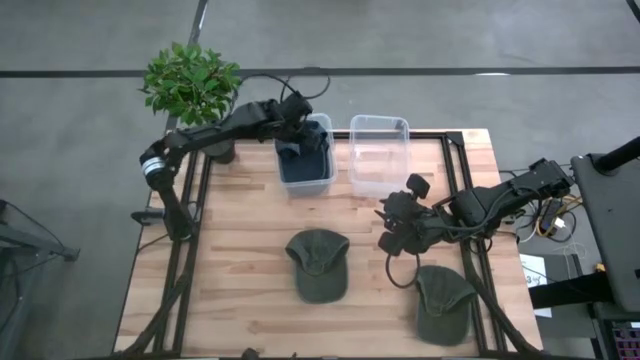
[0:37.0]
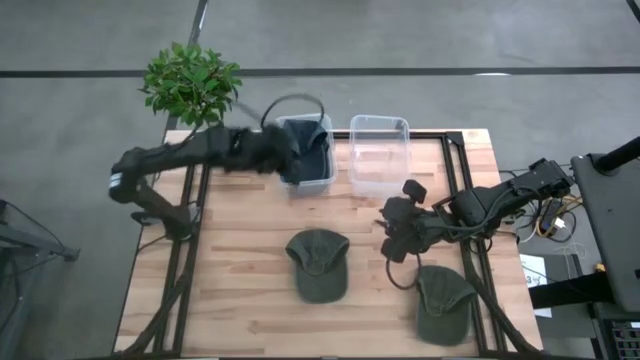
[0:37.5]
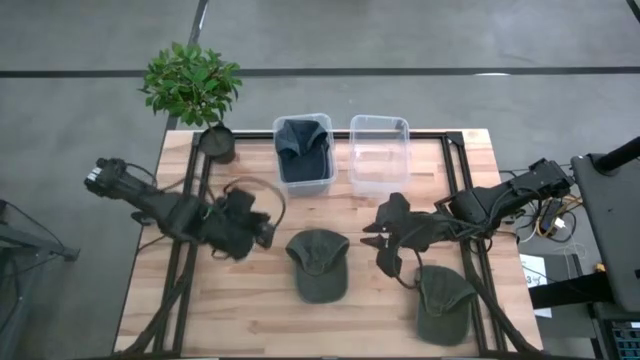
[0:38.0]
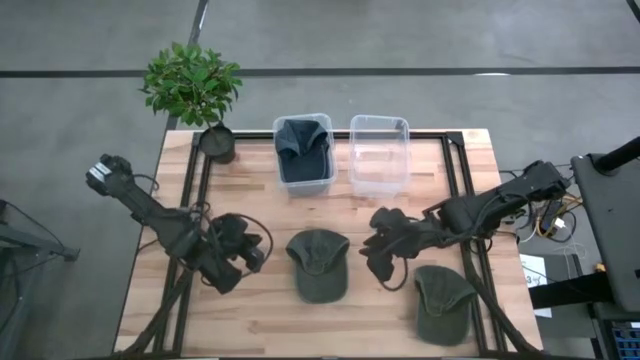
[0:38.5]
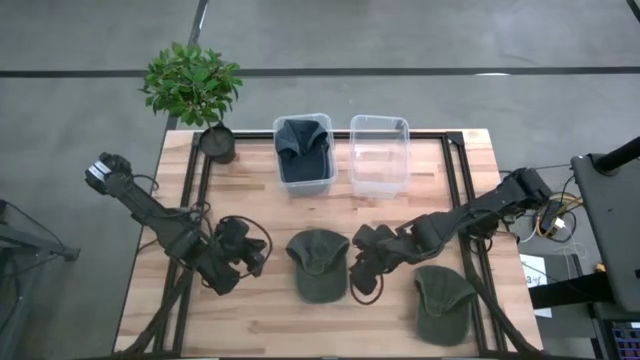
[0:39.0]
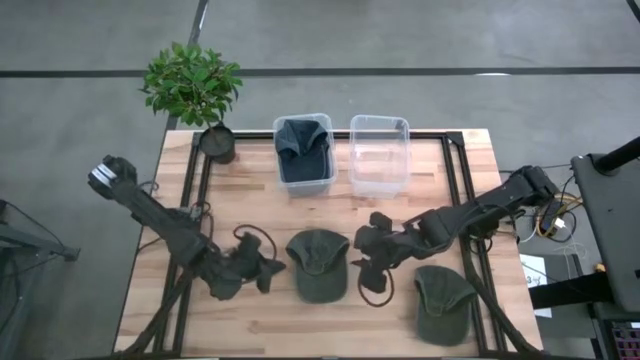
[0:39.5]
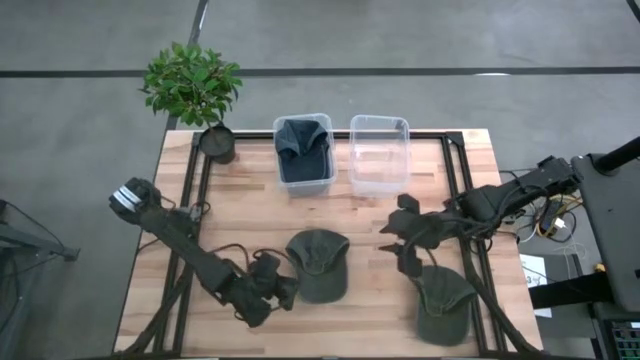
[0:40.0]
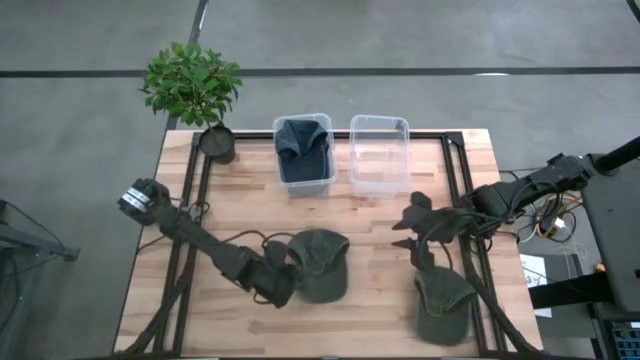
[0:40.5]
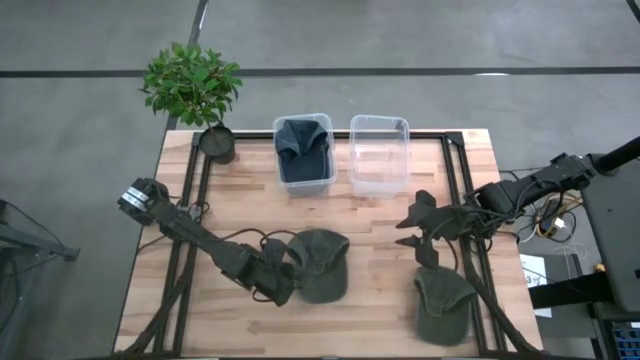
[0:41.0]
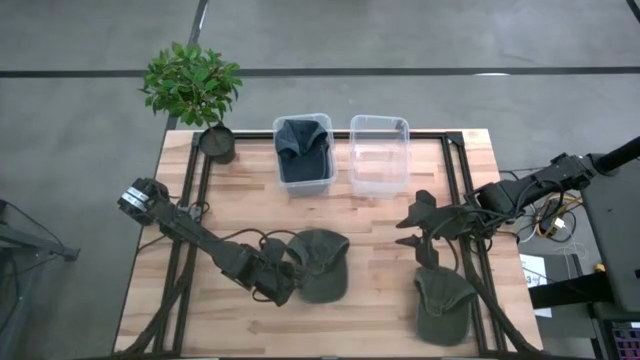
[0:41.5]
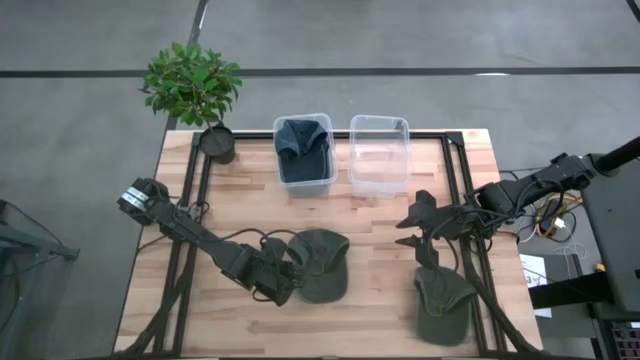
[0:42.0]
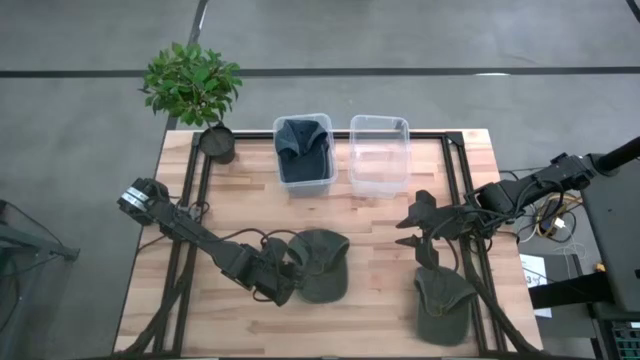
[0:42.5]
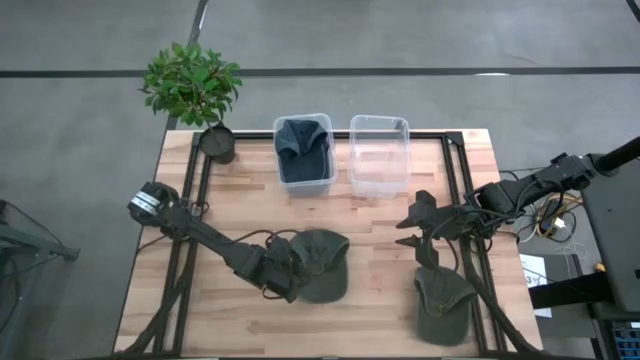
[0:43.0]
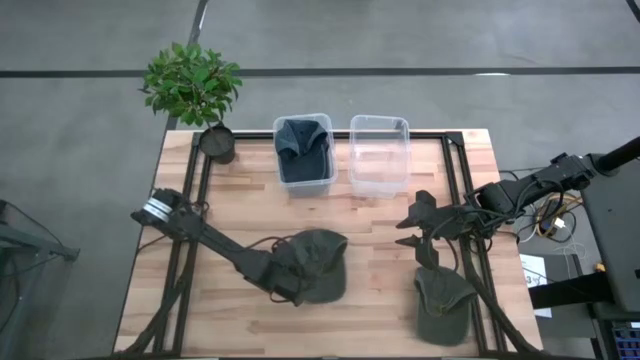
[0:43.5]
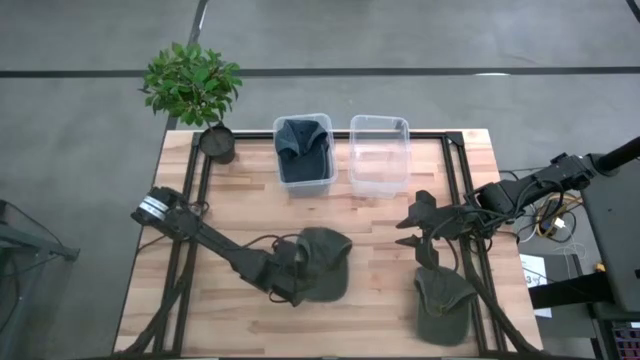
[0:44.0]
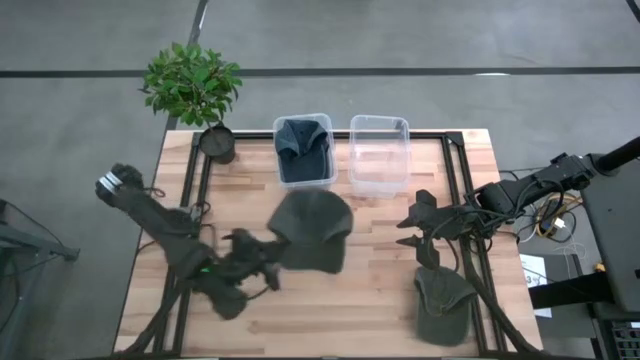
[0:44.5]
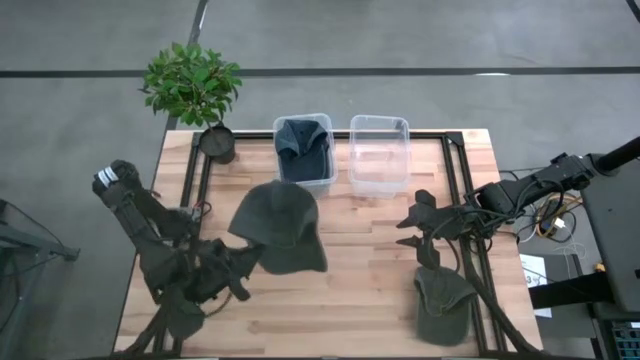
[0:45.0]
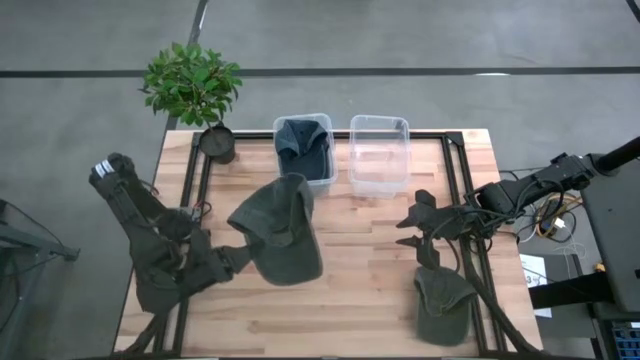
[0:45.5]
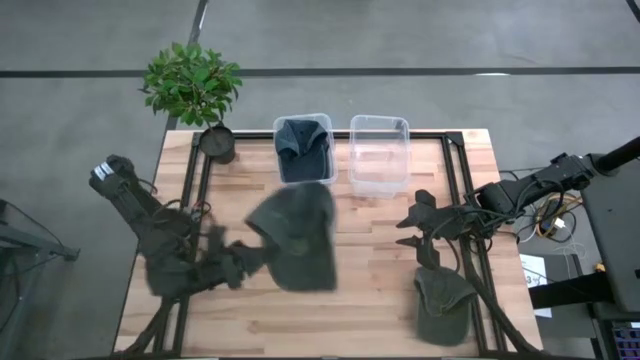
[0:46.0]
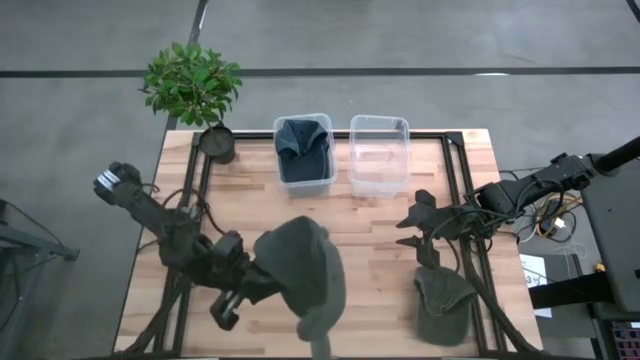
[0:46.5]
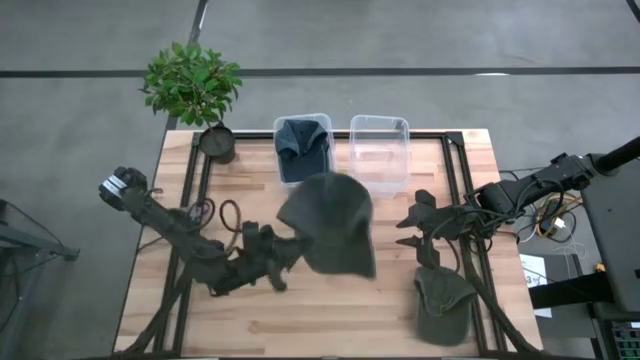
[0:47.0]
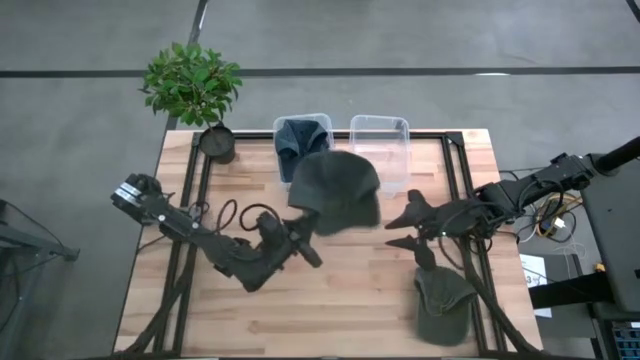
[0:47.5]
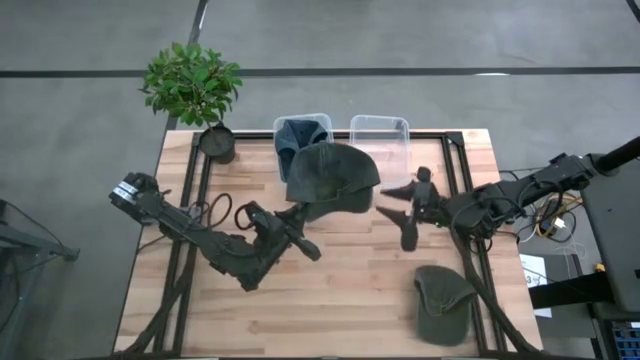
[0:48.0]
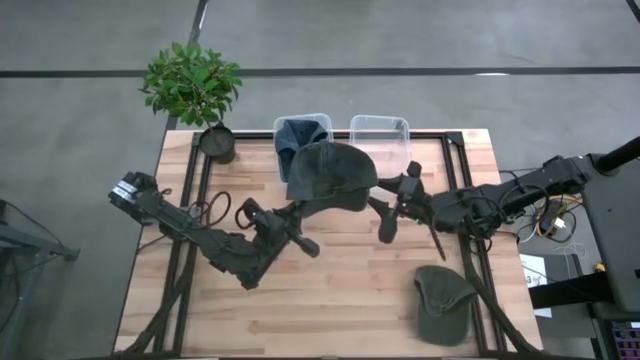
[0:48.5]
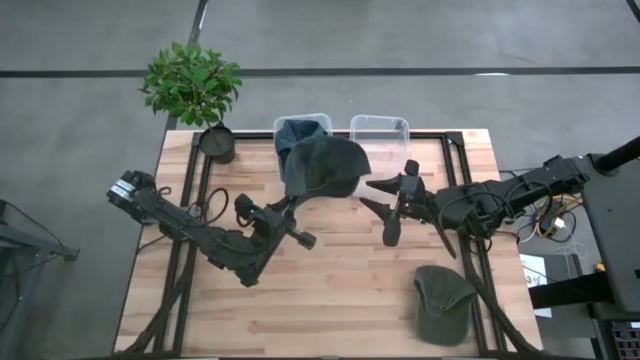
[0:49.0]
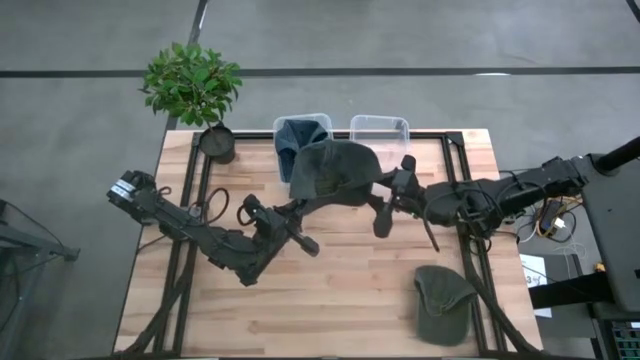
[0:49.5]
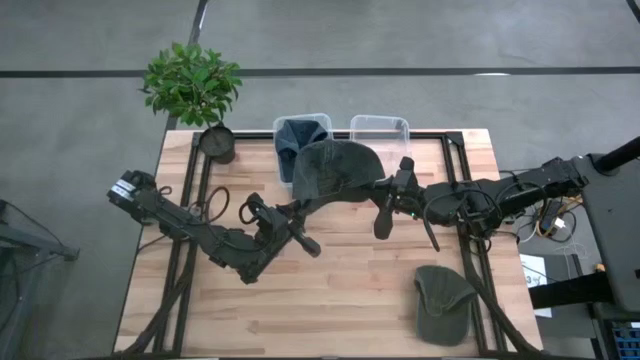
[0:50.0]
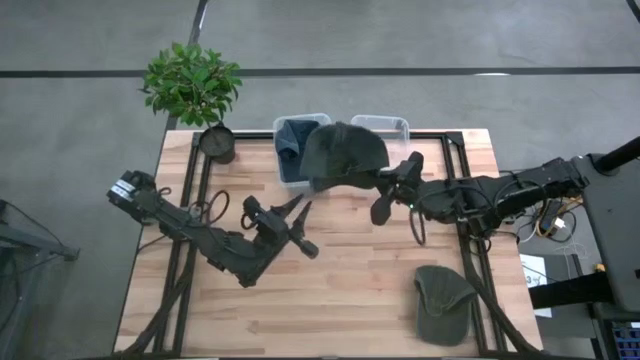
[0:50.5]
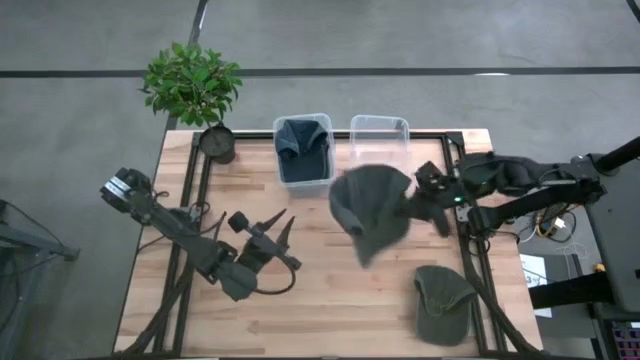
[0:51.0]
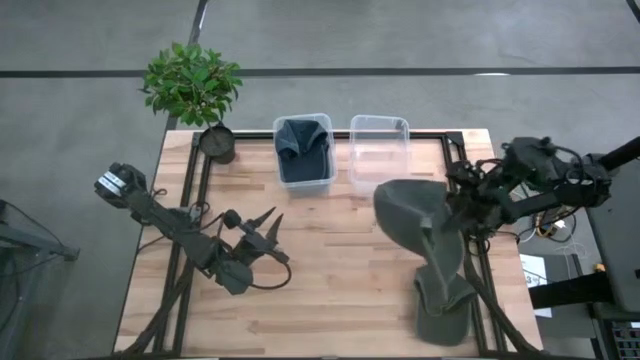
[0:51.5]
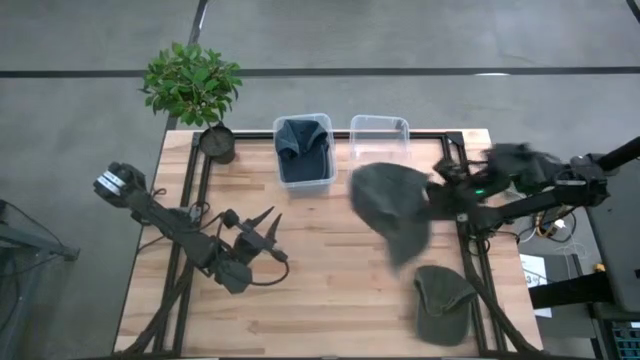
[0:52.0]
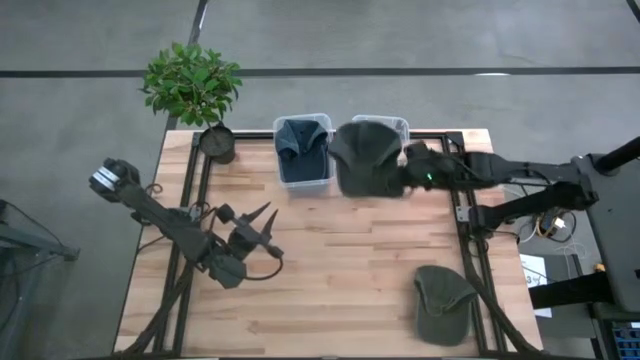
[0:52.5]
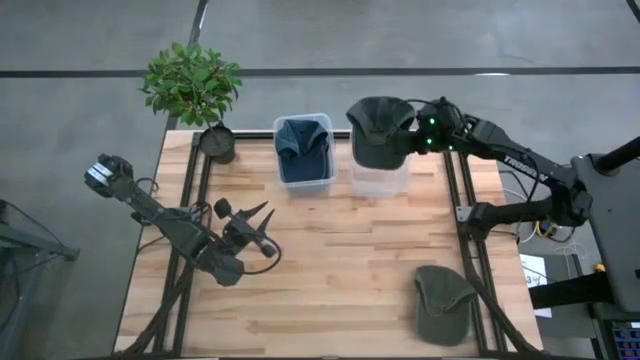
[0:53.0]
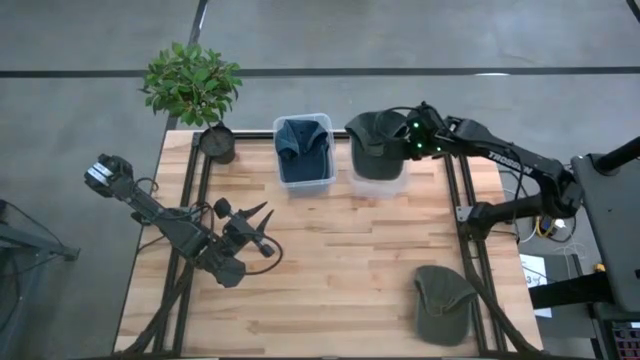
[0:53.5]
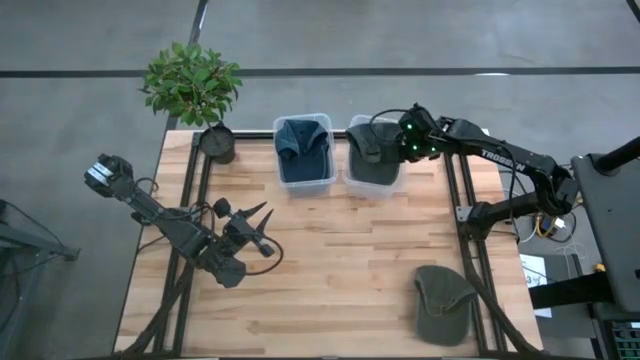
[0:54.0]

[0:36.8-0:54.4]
Task: Pick & Place hat
Put the left black cap into the right transparent bin

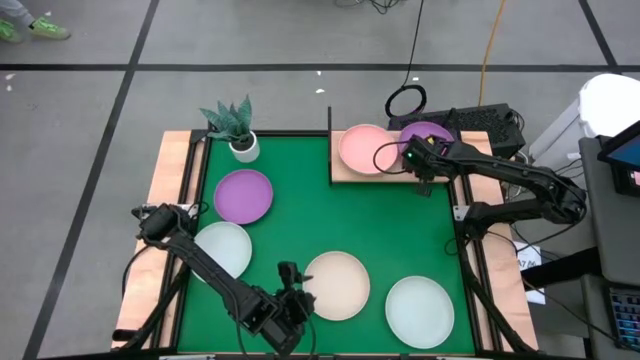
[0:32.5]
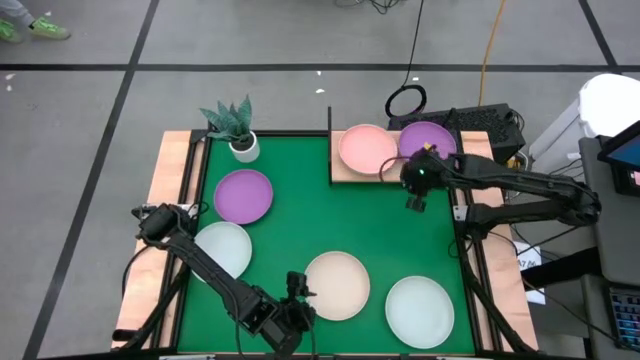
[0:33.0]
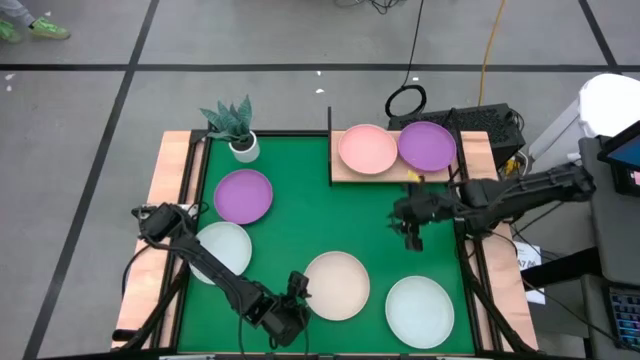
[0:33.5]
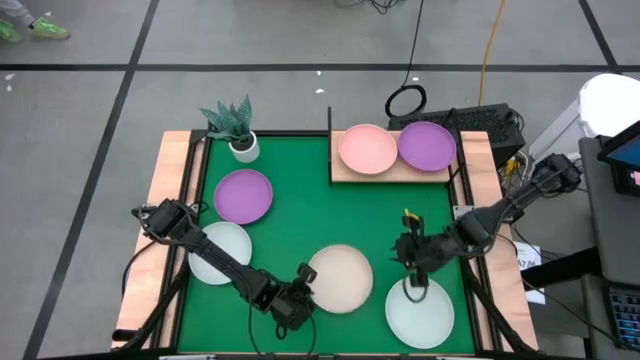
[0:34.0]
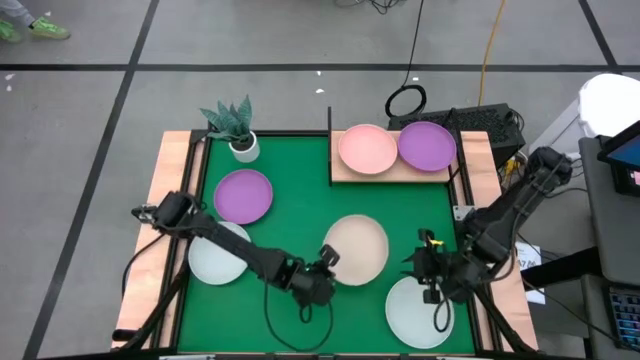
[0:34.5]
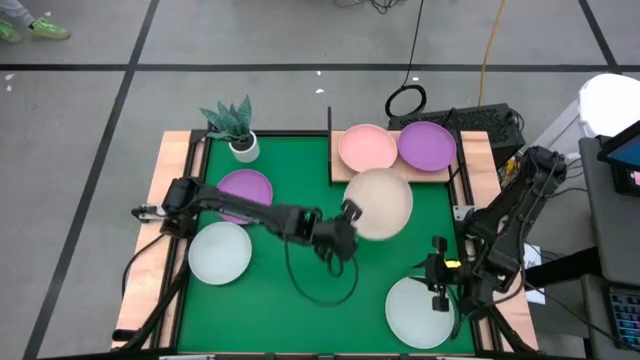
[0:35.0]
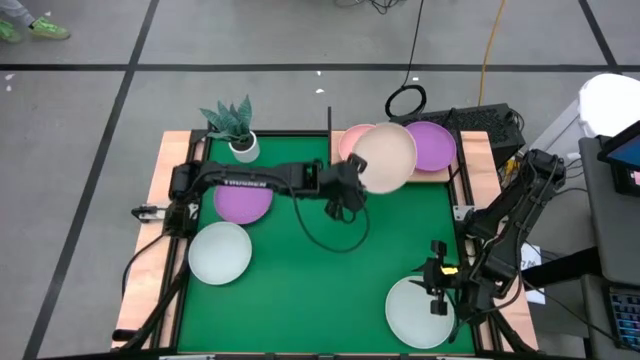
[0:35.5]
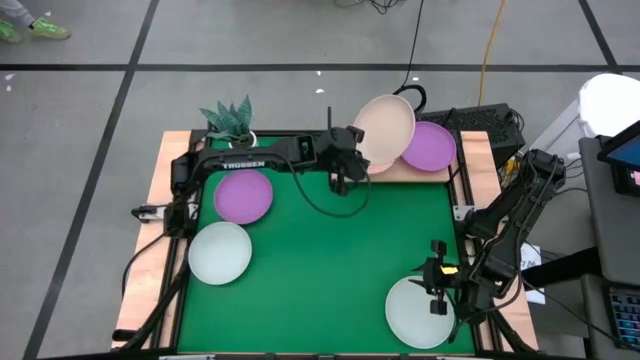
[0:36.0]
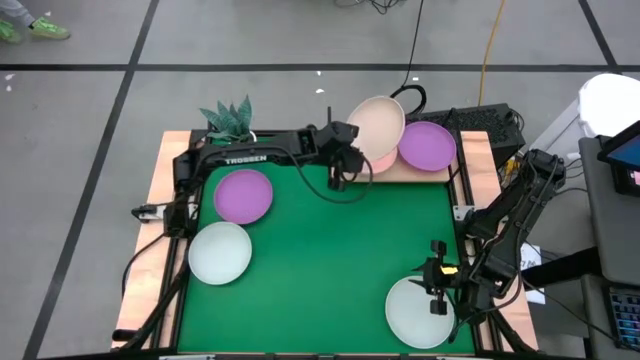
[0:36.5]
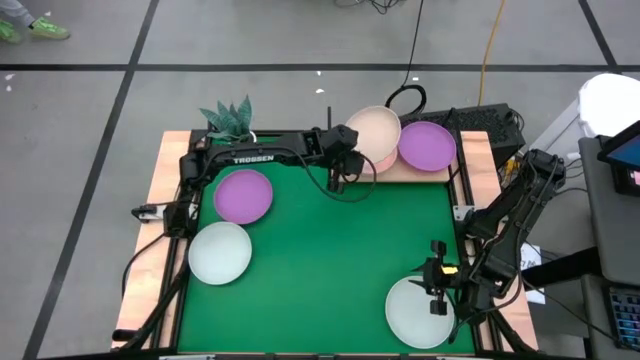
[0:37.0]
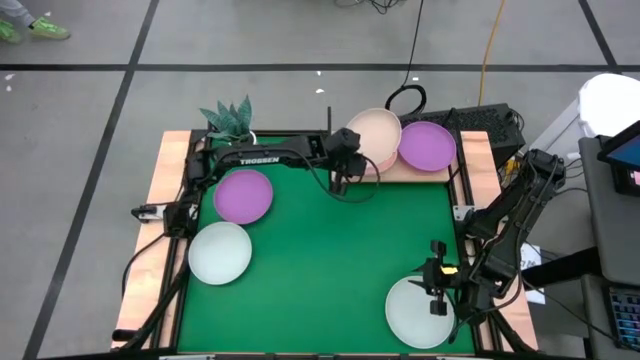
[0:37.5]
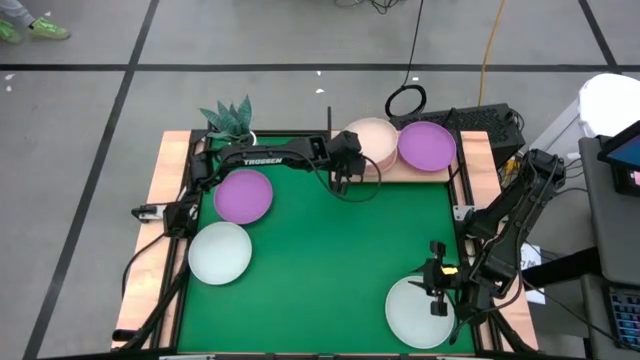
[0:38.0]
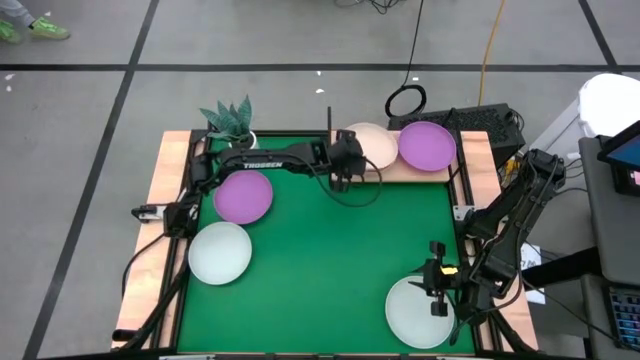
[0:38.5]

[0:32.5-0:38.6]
Task: Place and stack plates onto a shelf
Stack the white plate on the light orange plate on the shelf
